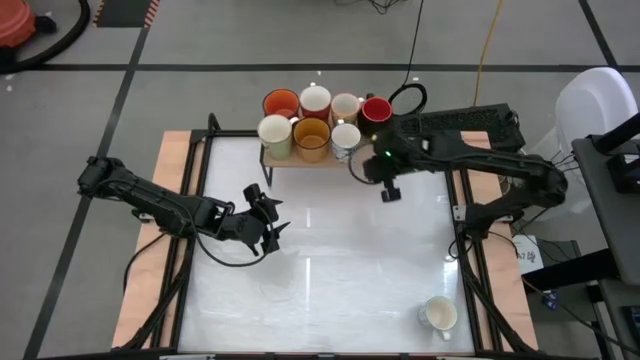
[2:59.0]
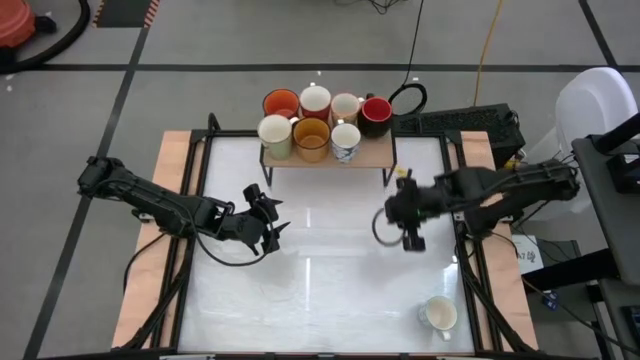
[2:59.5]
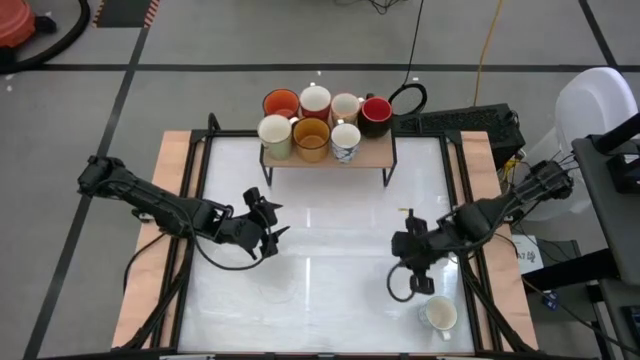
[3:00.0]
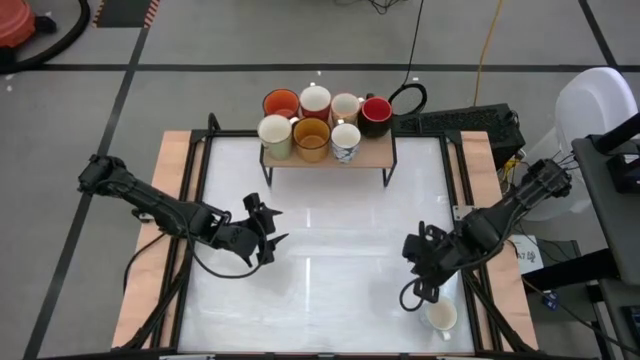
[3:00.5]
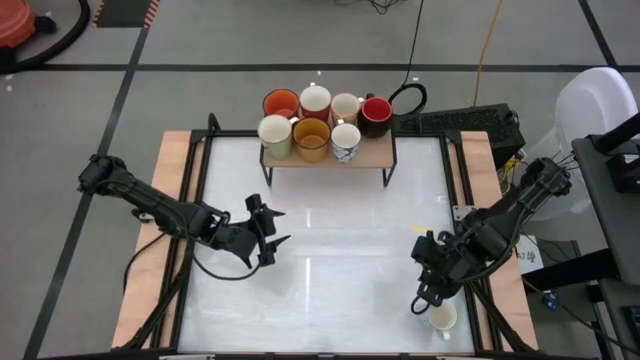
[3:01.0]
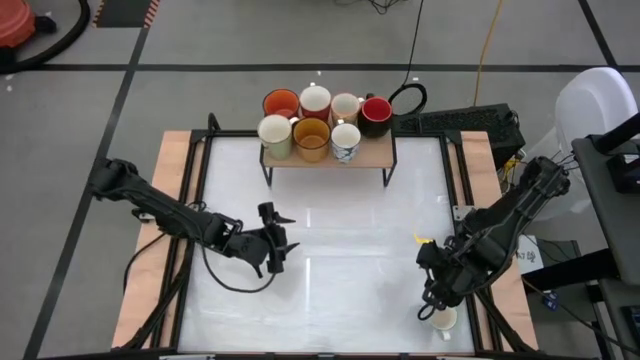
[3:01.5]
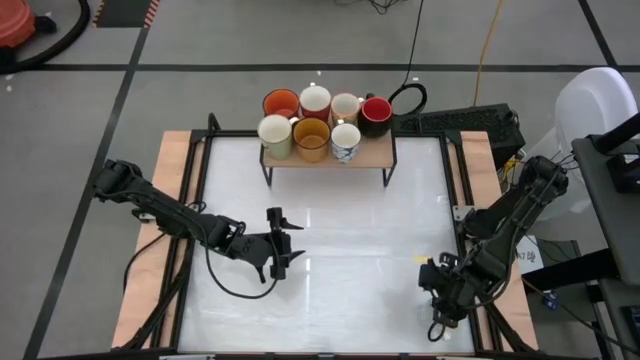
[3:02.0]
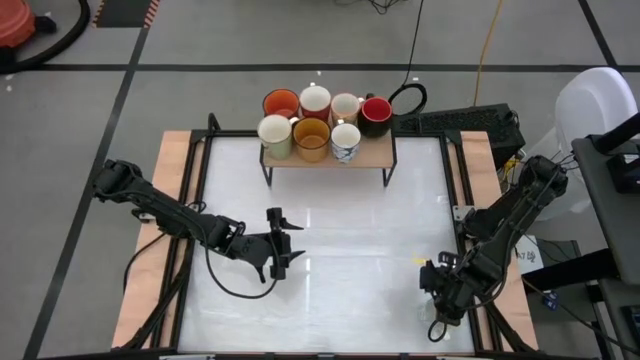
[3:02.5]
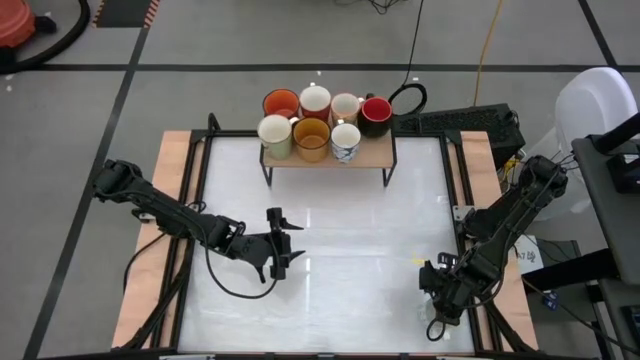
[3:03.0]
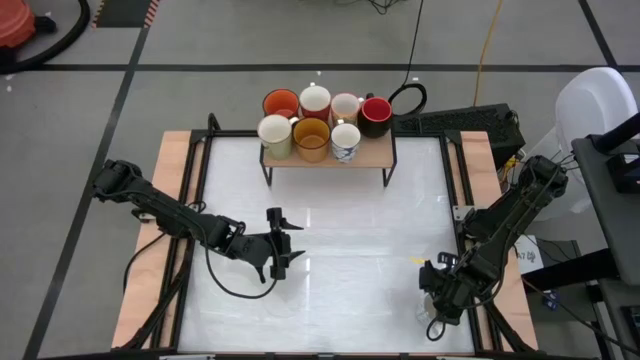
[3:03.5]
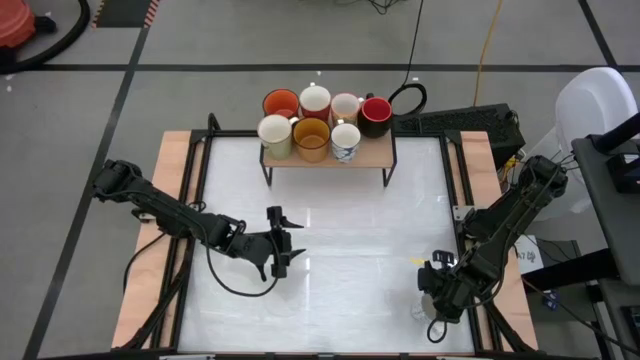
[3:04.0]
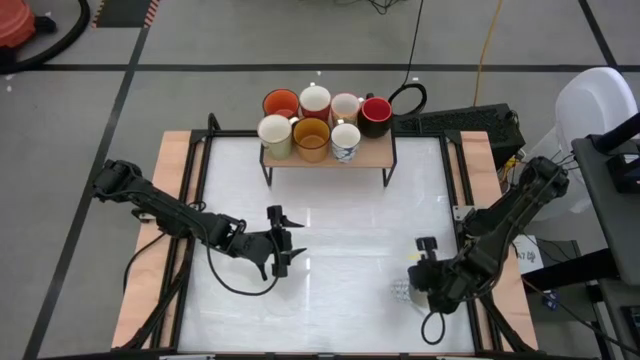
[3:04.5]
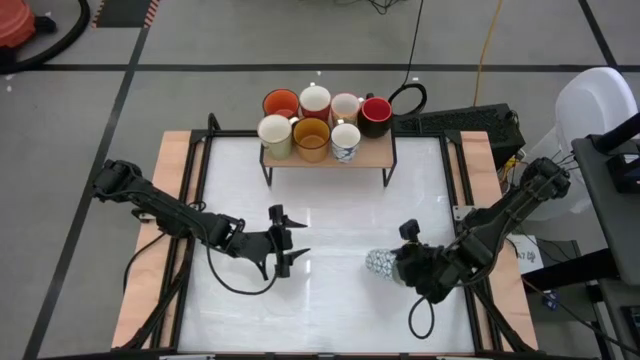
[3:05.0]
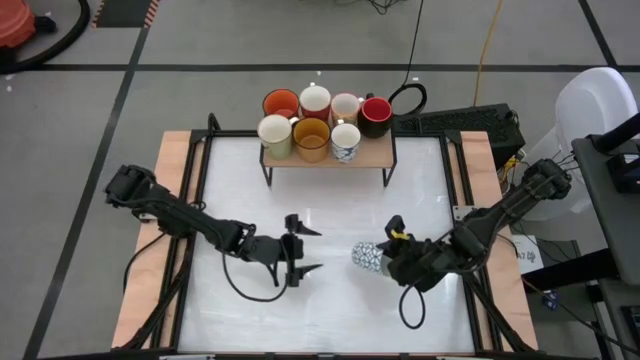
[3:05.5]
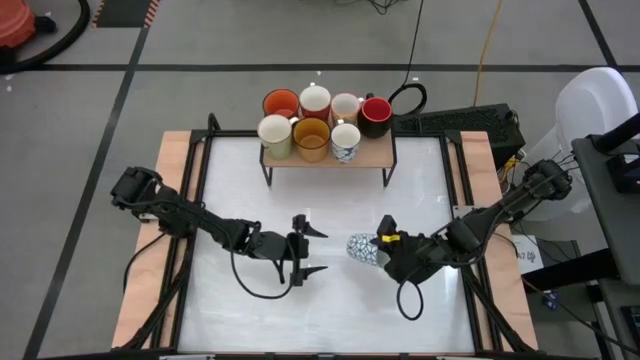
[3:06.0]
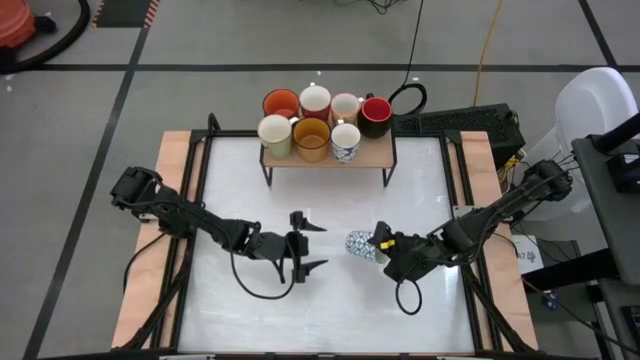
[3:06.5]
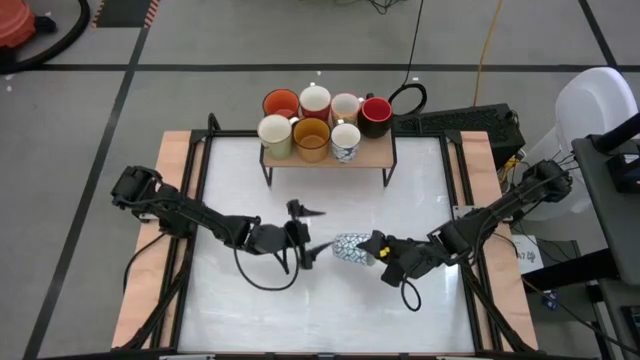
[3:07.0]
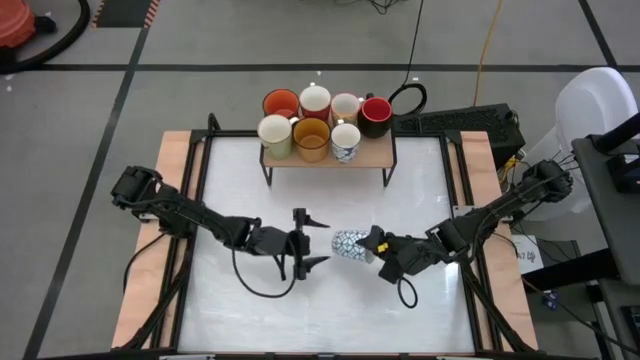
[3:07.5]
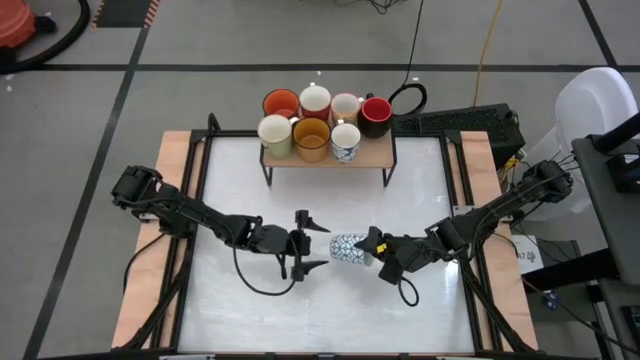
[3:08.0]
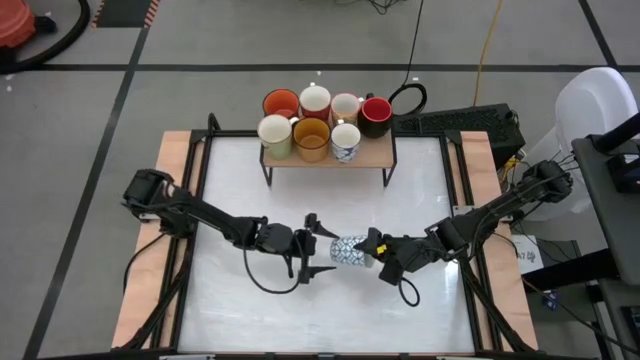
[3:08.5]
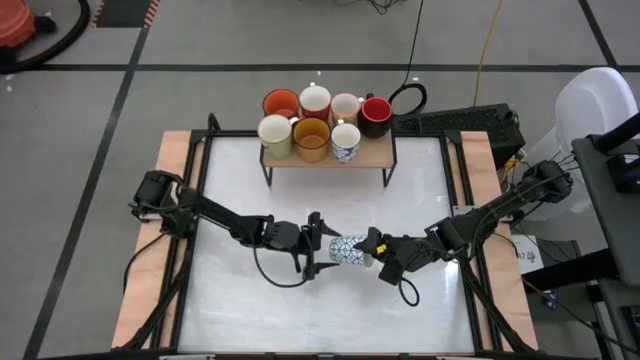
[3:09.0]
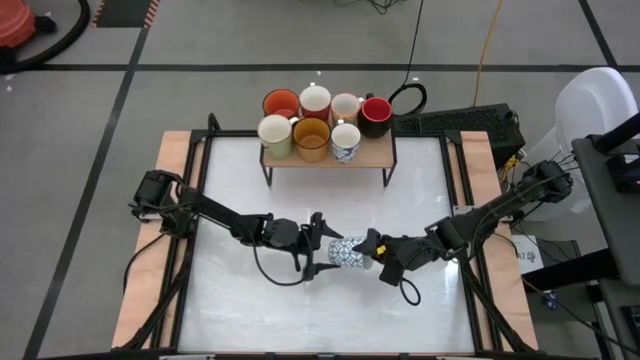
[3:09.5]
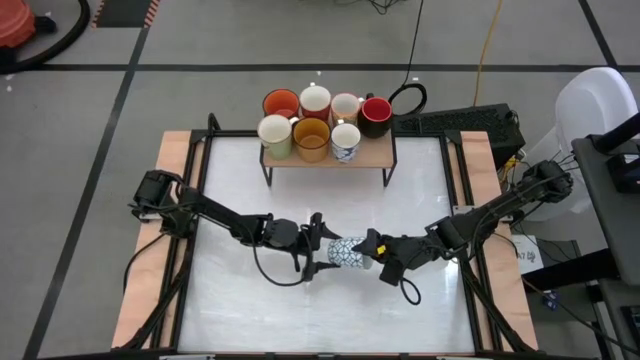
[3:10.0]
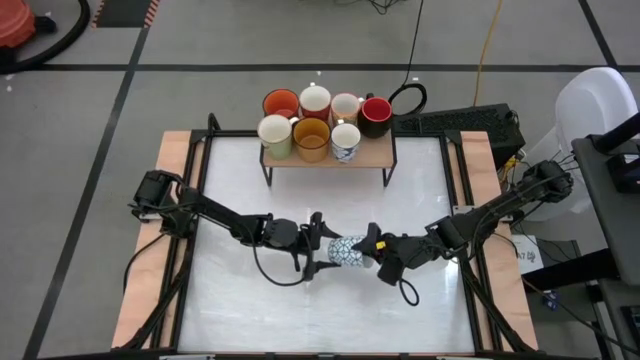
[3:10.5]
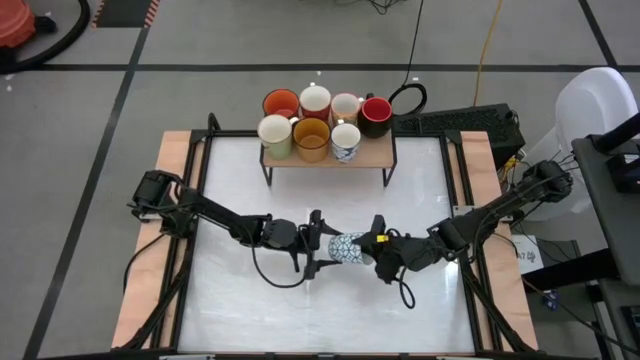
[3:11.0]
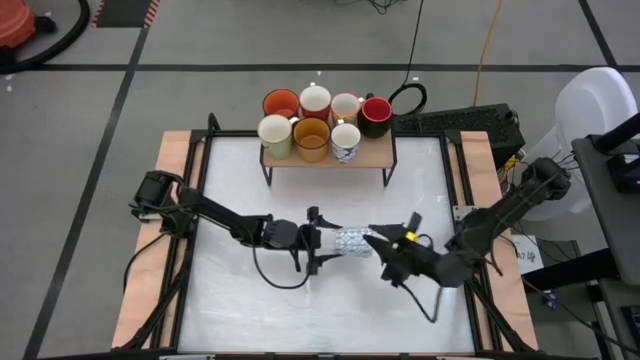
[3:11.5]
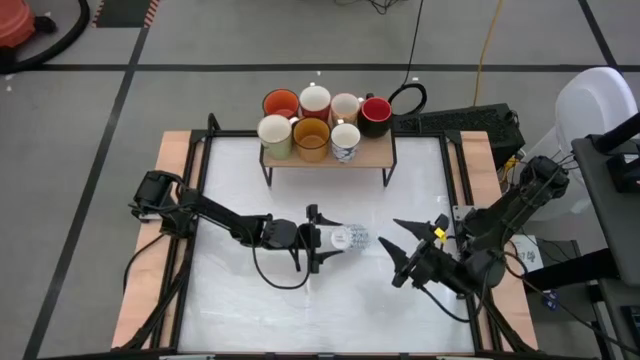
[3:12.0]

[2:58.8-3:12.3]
Task: Place coffee mugs
Put the light blue patterned mug on the shelf

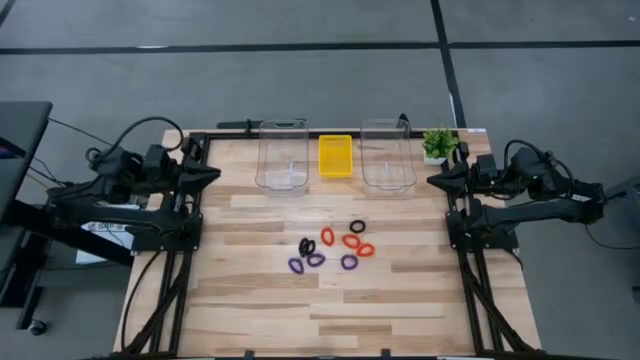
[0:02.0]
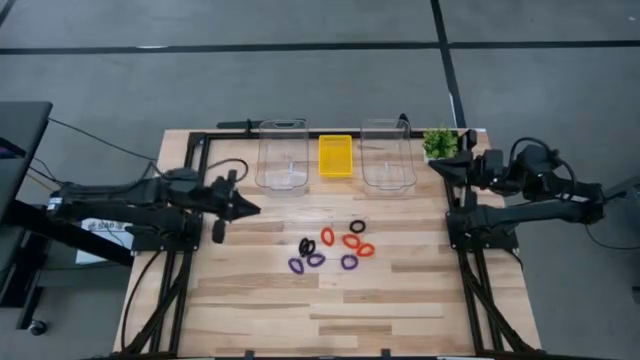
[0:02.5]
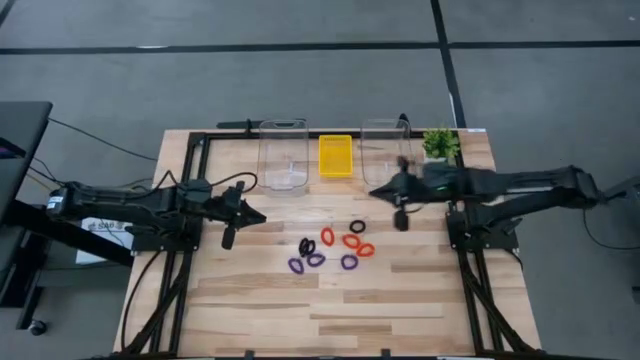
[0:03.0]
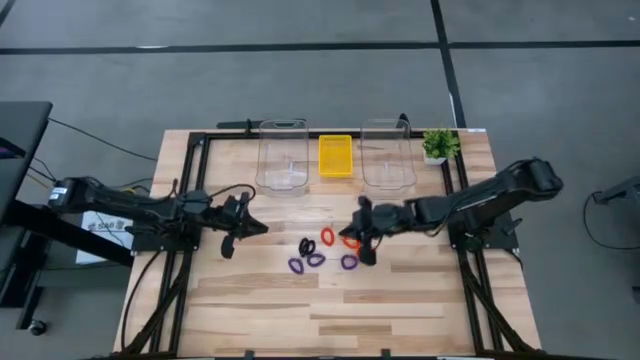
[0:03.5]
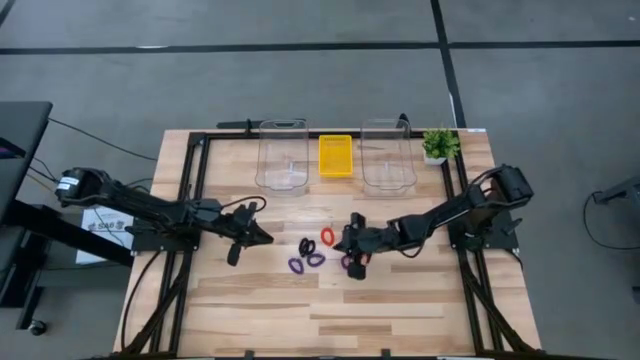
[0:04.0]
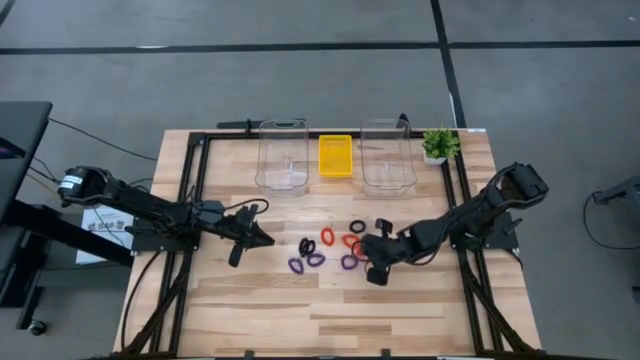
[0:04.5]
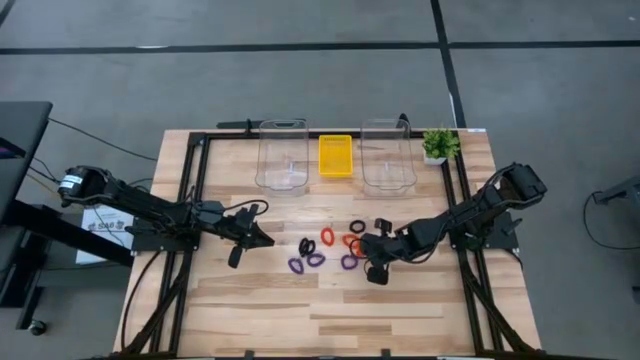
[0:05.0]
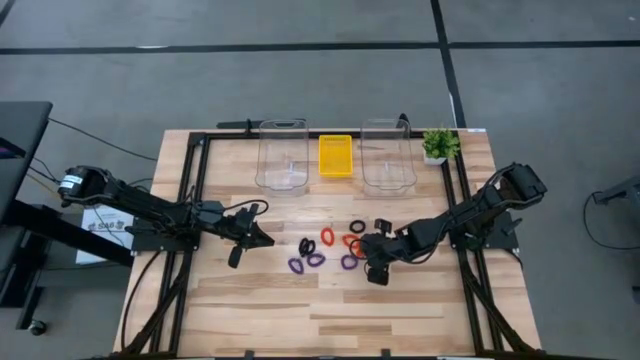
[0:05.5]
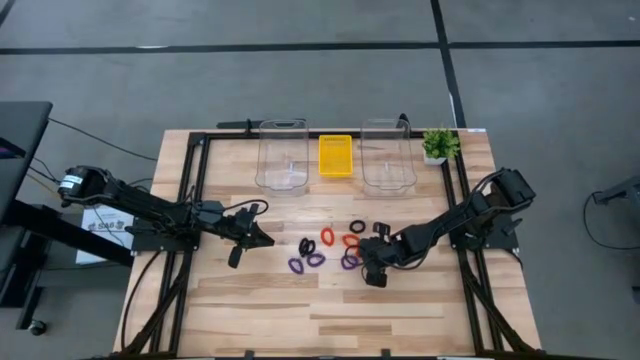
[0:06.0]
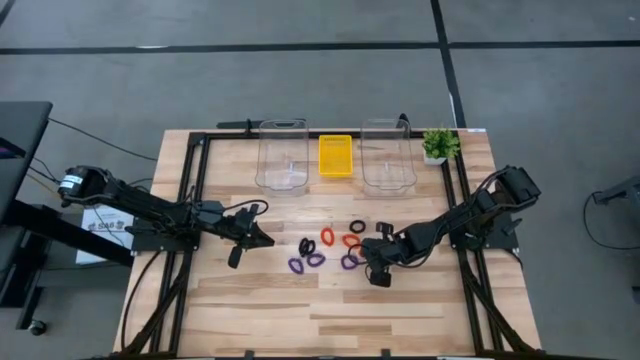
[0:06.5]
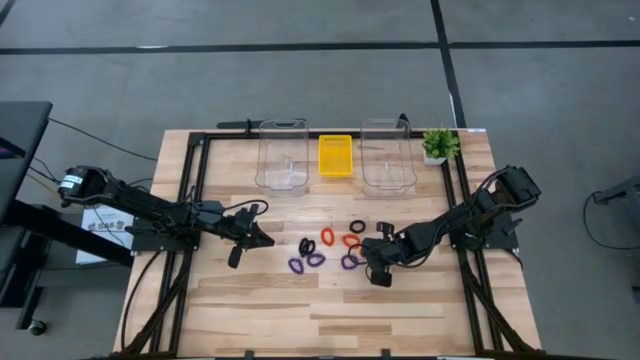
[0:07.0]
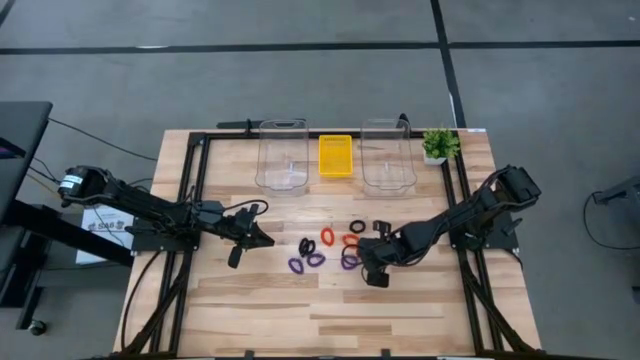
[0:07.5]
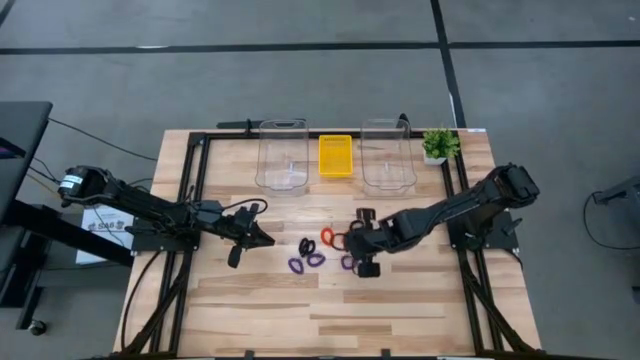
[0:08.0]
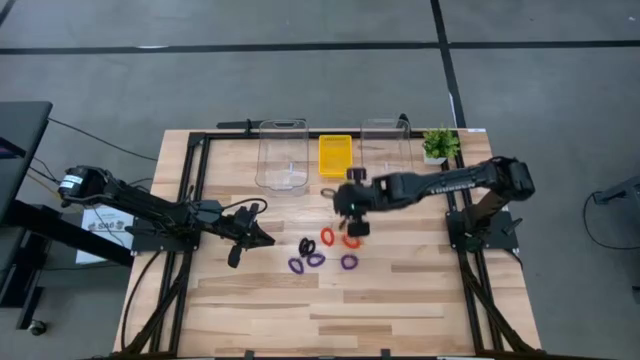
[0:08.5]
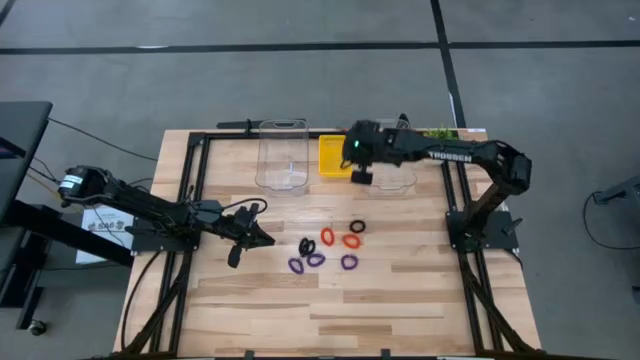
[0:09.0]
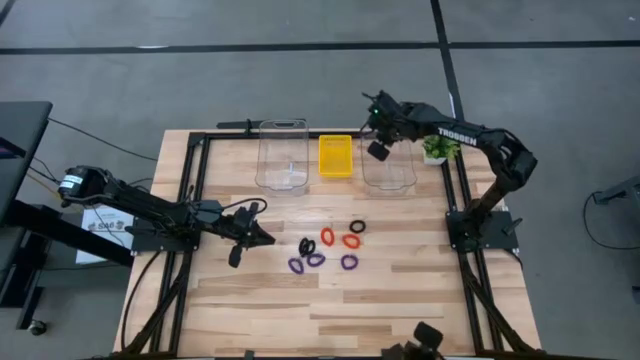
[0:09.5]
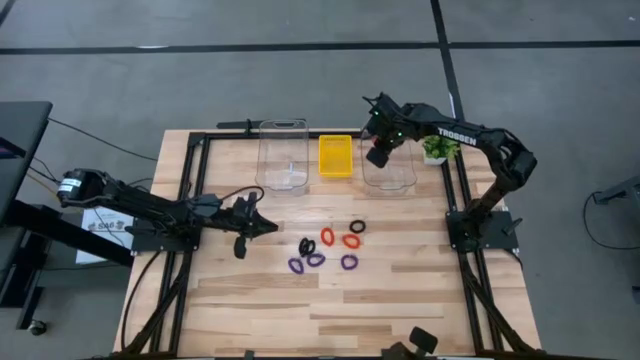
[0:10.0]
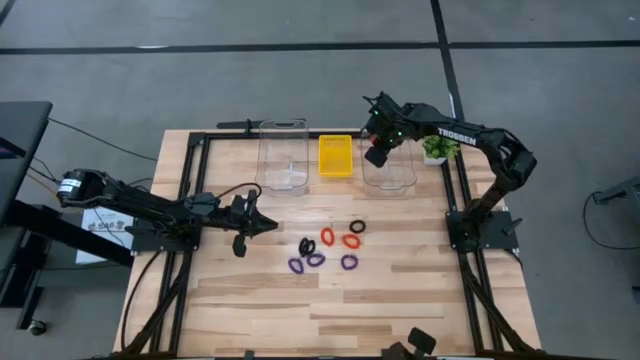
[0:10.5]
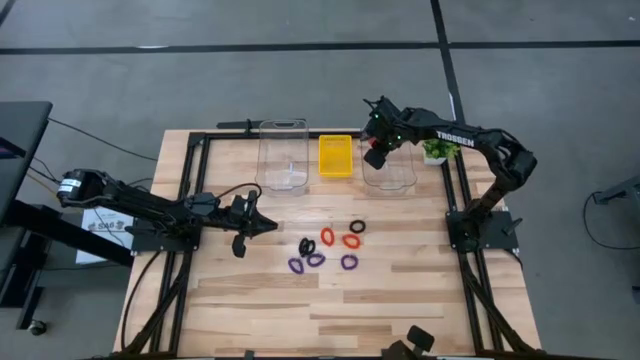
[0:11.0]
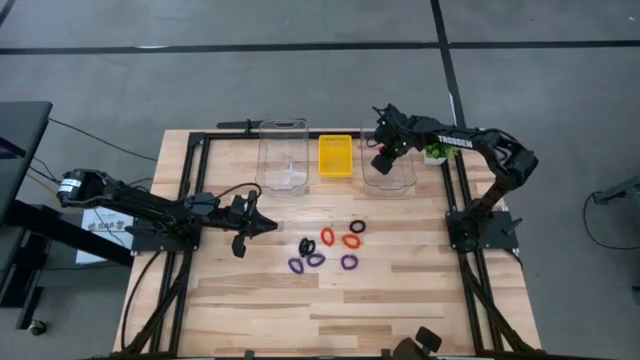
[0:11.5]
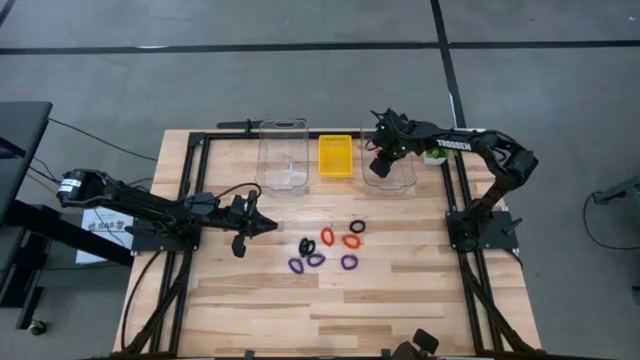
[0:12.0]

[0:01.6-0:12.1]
Task: Sort spring keychains
Put the right orange spring keychain into the right transparent bin
